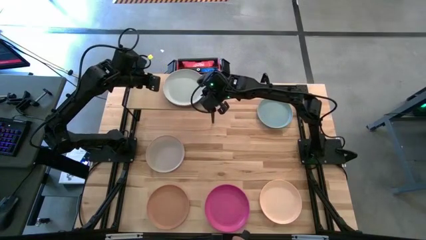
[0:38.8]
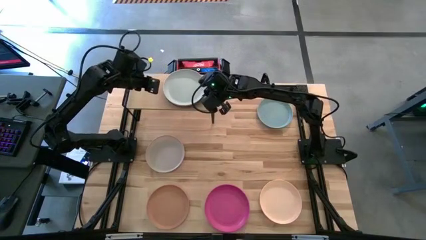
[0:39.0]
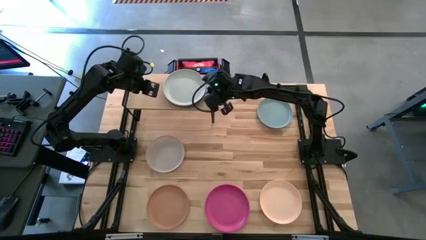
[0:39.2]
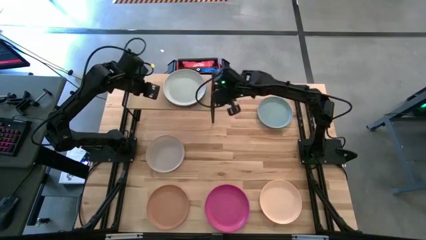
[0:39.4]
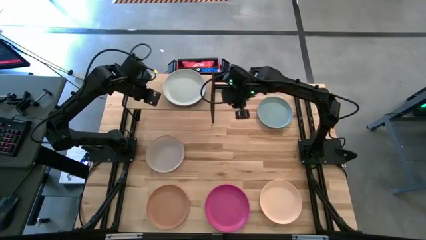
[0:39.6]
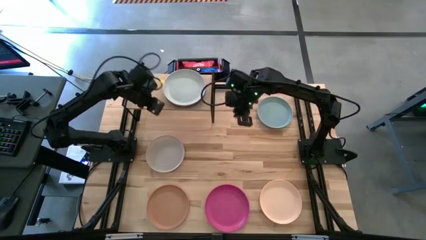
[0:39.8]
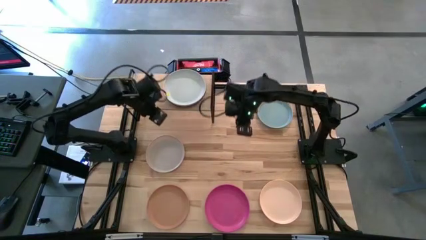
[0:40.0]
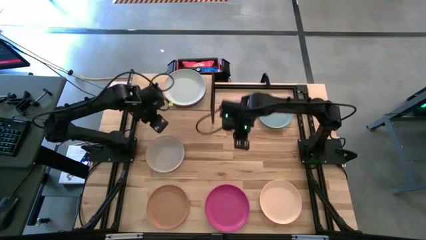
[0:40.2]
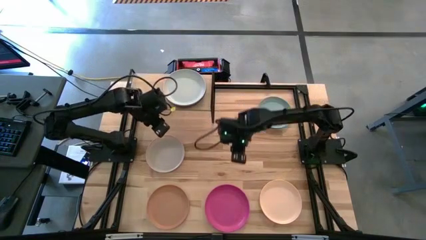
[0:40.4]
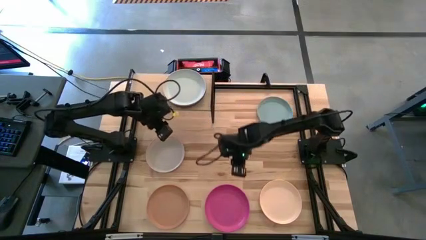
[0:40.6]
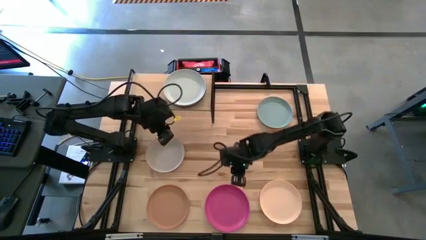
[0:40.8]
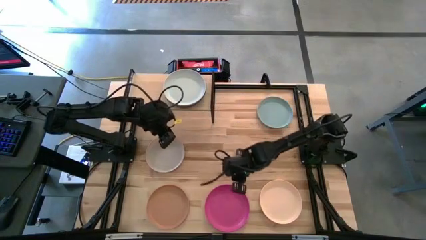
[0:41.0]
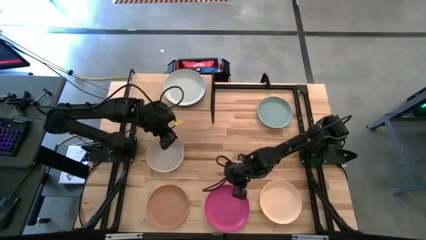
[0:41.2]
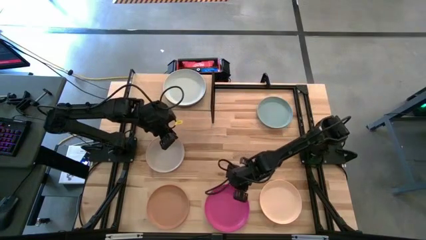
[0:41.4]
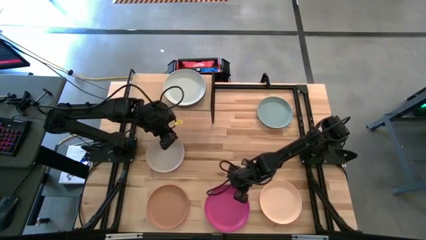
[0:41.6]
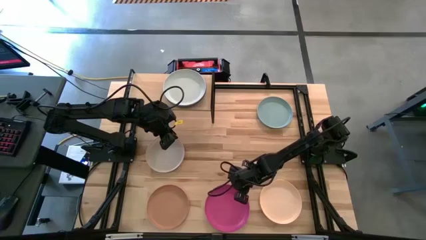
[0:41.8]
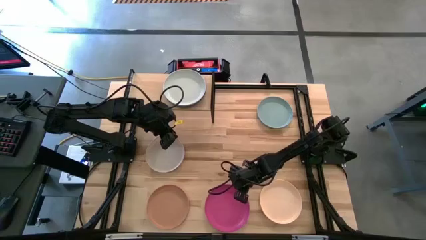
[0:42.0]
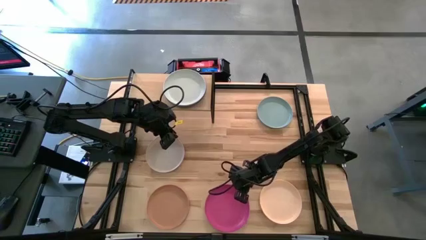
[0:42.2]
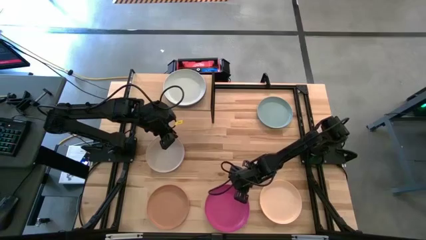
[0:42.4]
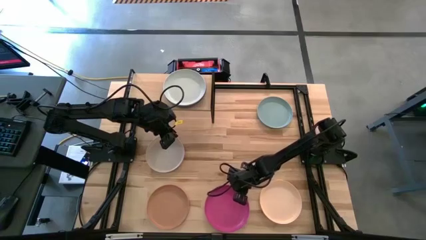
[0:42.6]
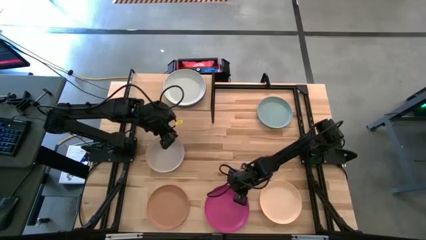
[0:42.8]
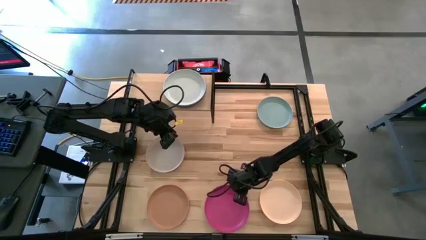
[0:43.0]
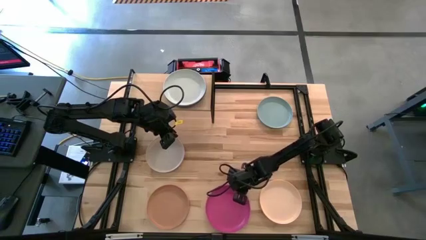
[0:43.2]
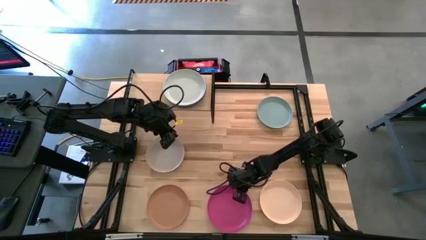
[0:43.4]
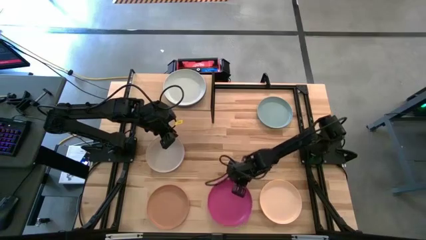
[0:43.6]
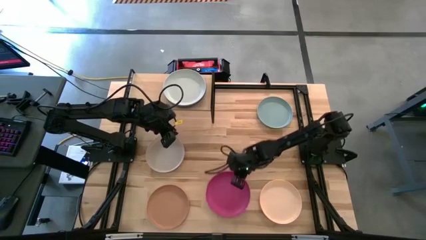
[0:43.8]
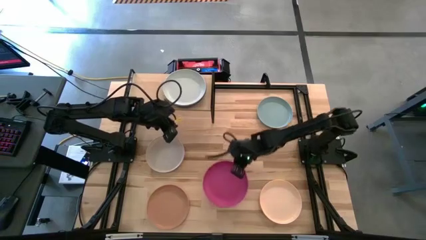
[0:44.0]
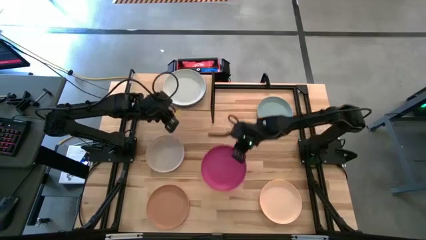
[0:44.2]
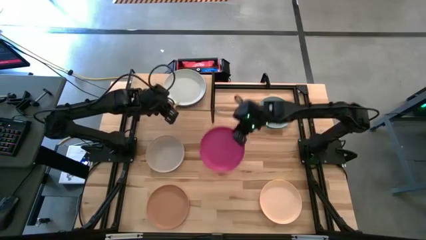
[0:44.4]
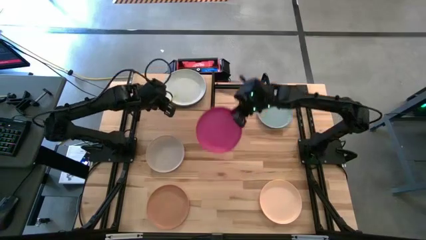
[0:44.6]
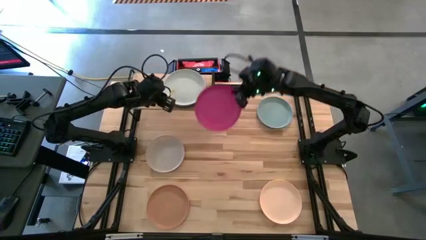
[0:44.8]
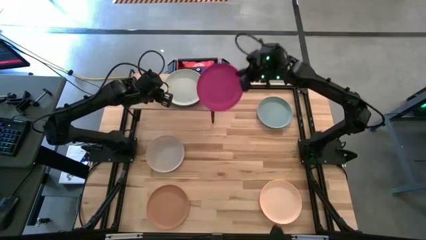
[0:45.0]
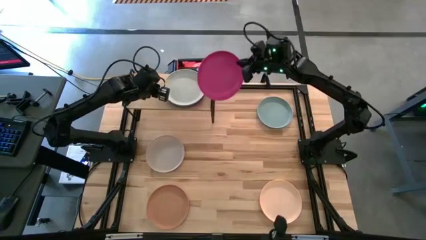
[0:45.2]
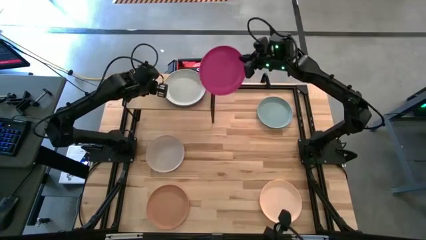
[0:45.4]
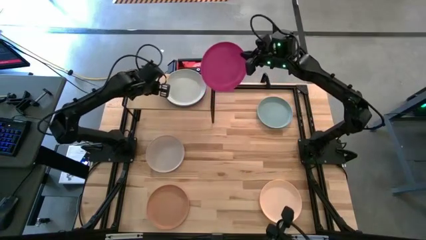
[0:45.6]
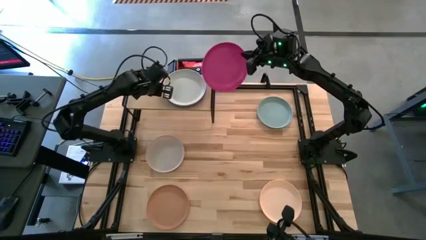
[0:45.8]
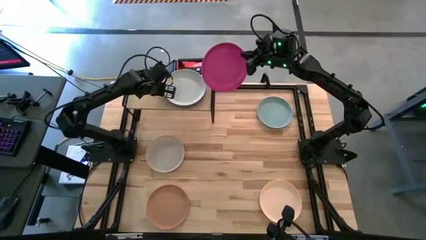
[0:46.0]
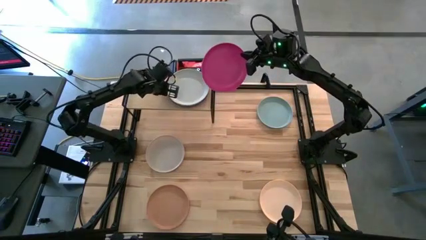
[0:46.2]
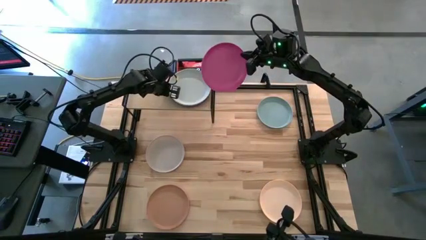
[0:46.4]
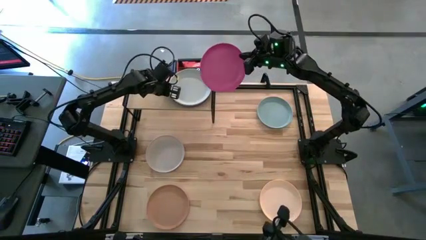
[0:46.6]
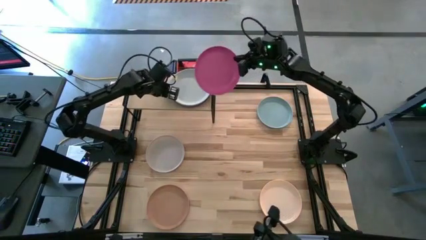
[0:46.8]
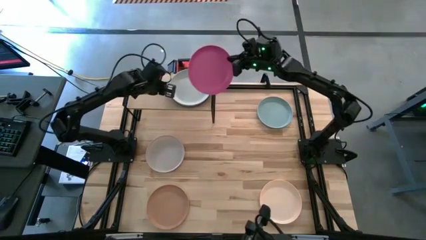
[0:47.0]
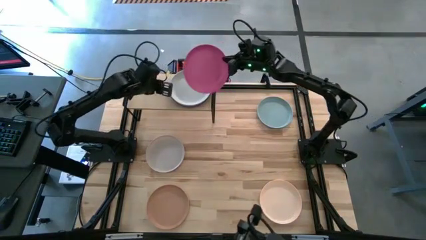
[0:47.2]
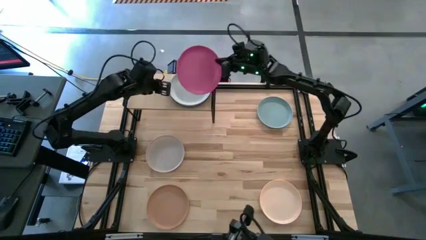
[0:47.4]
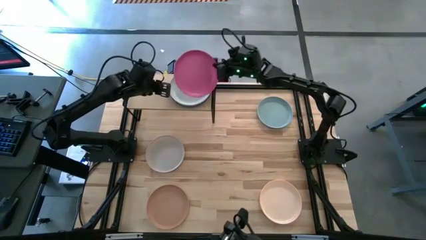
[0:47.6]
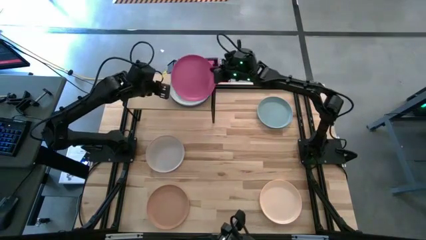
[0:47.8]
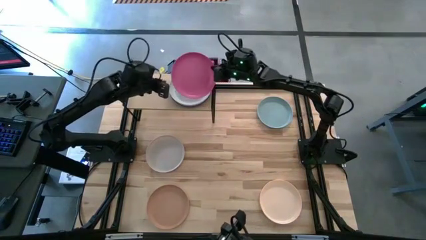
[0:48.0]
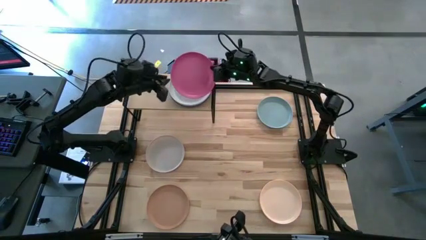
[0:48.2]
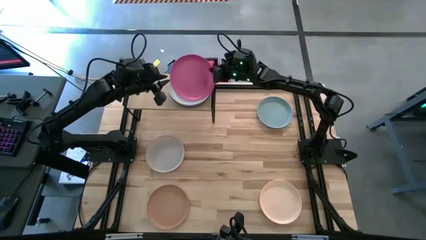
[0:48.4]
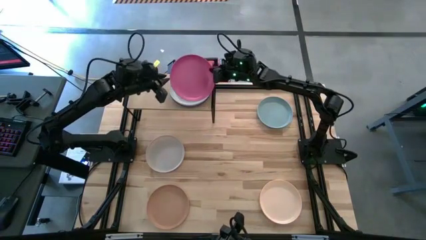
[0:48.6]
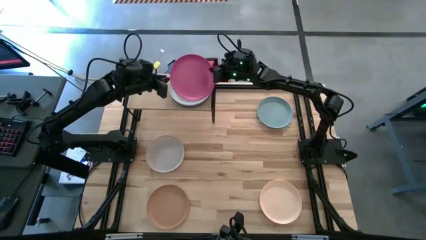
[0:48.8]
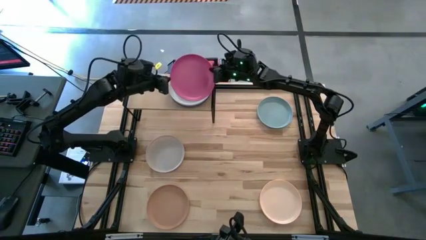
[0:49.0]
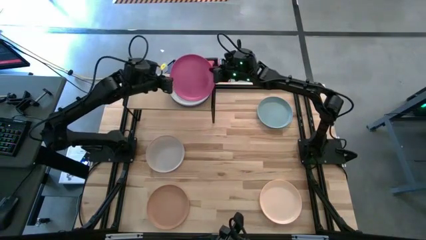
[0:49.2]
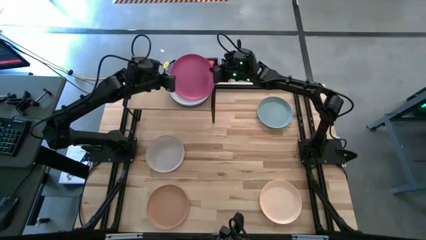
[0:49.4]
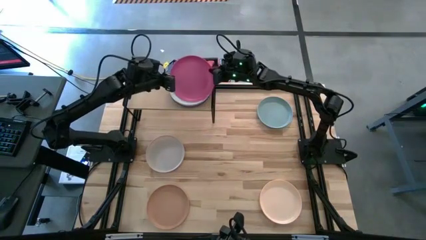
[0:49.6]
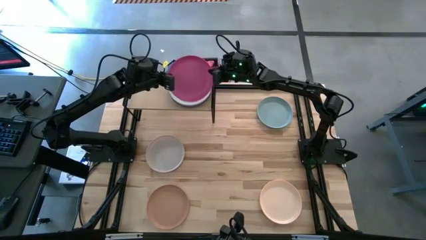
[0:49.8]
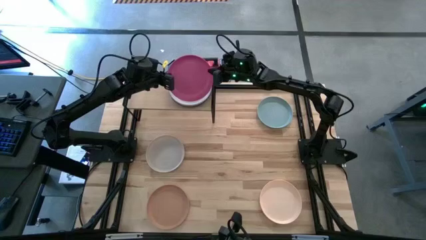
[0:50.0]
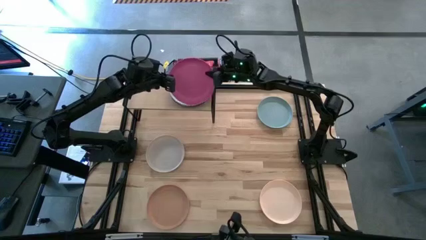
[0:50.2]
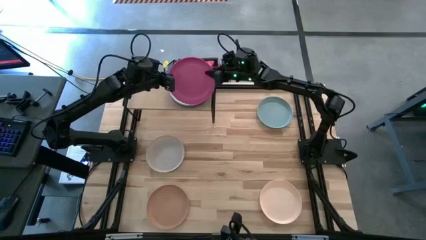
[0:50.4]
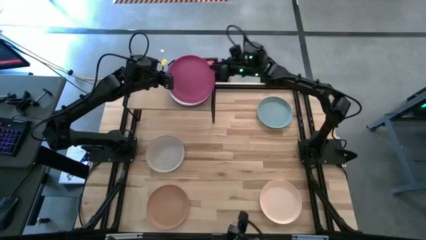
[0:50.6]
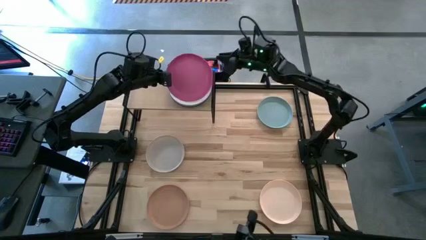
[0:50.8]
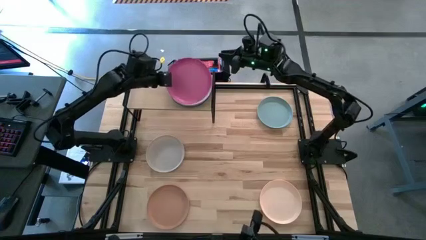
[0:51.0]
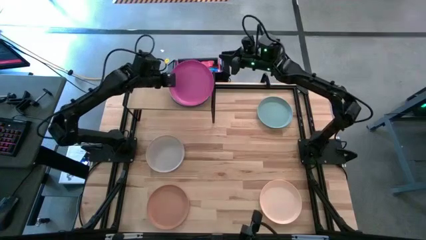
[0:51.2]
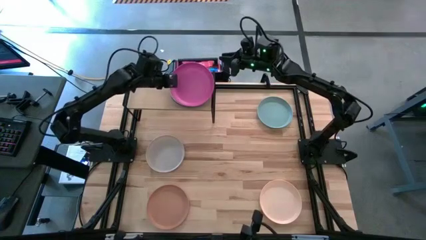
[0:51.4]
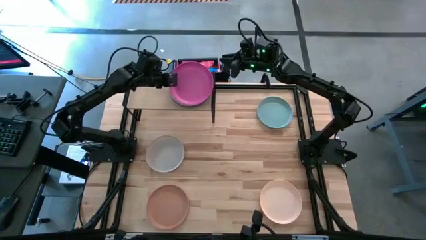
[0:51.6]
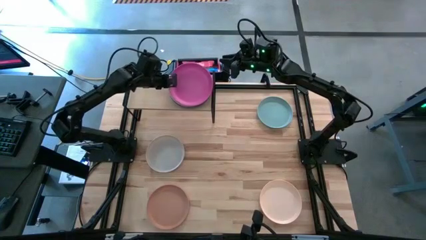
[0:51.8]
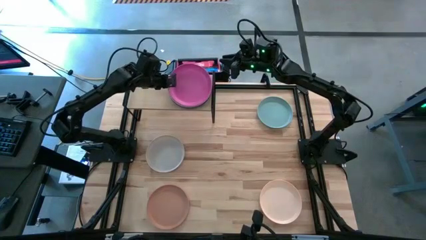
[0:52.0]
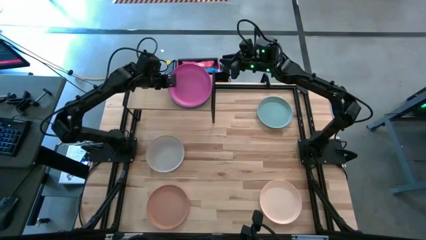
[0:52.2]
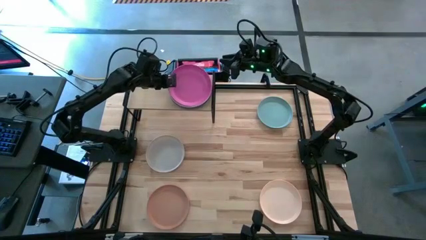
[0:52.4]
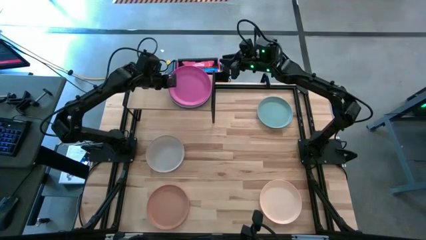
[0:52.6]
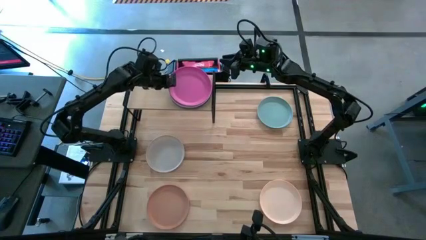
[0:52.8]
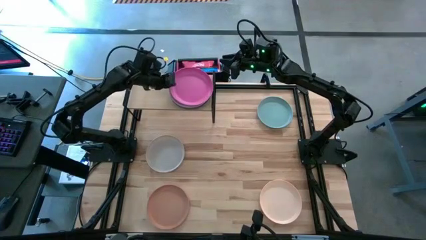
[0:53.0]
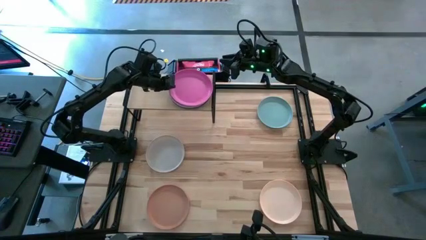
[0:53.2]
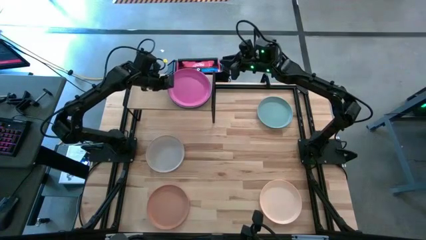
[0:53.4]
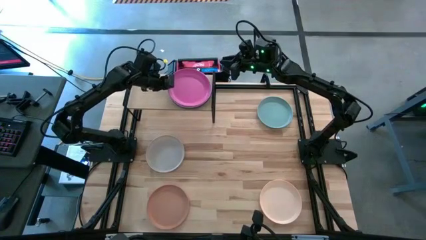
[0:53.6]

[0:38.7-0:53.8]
Task: Place and stack plates onto a shelf
Stack the dark pink plate on the white plate on the shelf
